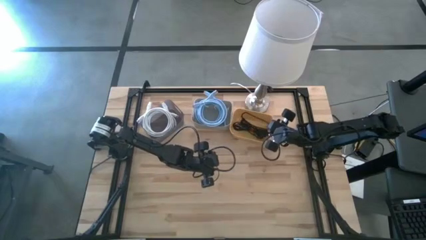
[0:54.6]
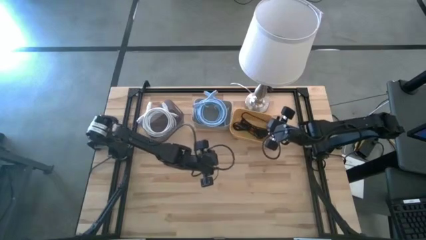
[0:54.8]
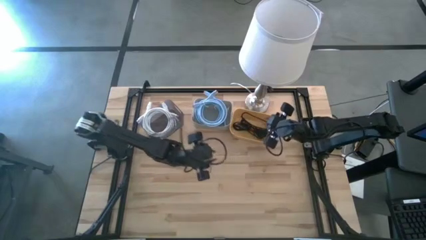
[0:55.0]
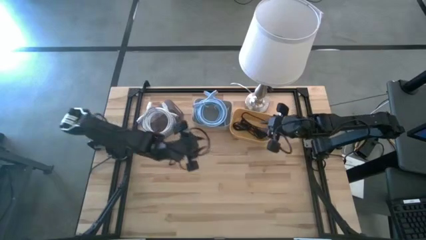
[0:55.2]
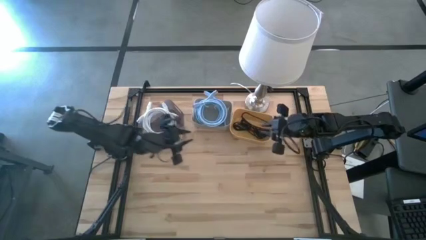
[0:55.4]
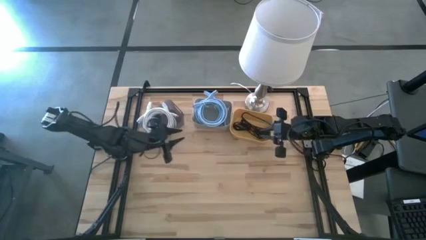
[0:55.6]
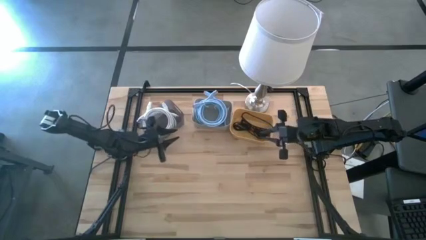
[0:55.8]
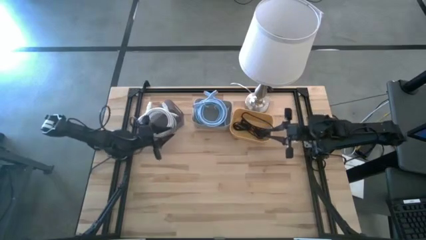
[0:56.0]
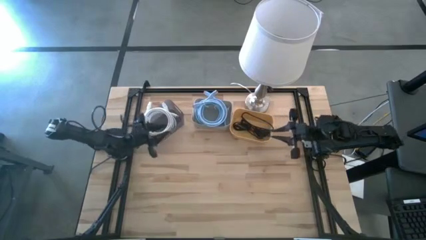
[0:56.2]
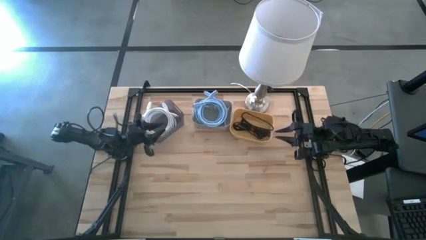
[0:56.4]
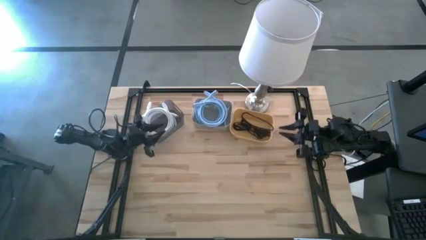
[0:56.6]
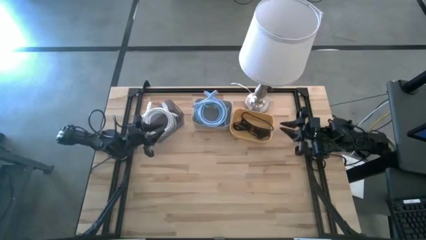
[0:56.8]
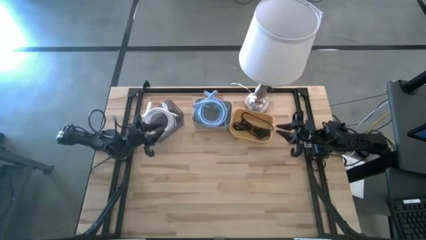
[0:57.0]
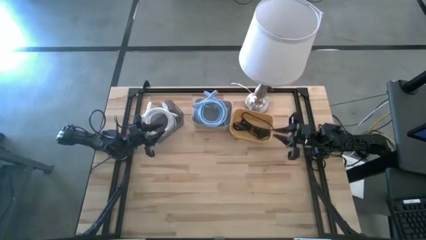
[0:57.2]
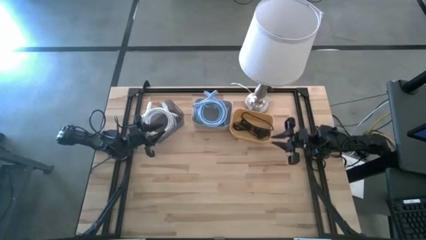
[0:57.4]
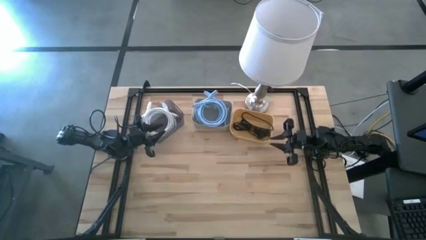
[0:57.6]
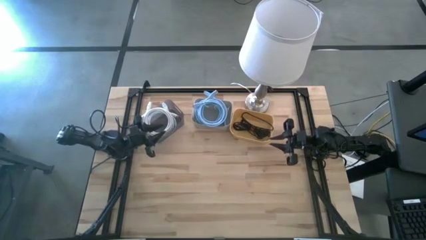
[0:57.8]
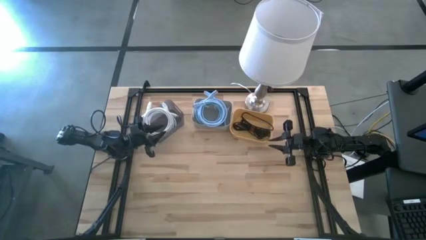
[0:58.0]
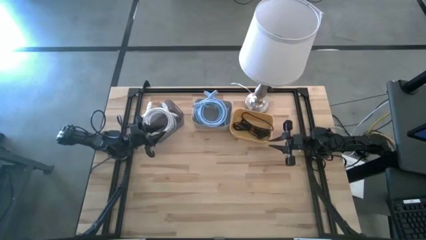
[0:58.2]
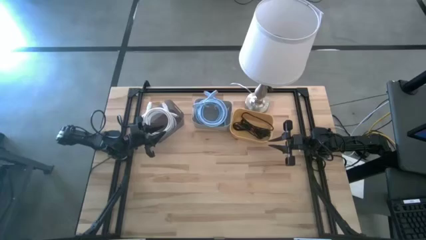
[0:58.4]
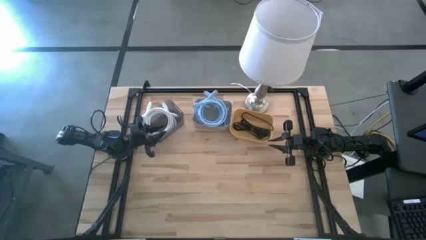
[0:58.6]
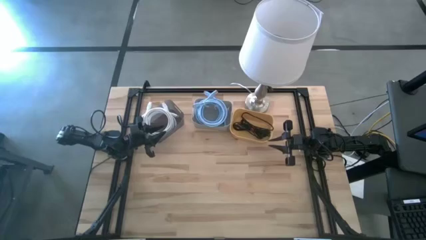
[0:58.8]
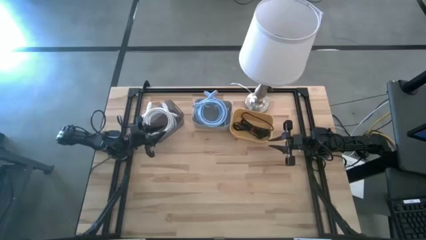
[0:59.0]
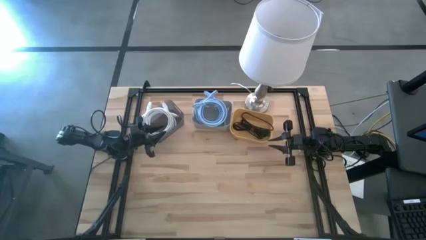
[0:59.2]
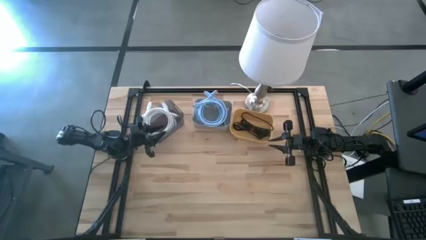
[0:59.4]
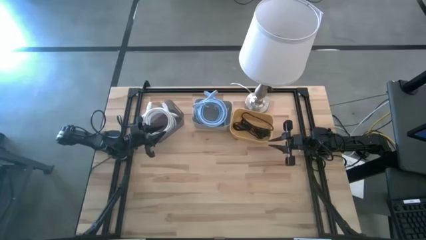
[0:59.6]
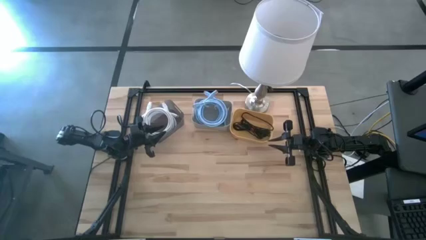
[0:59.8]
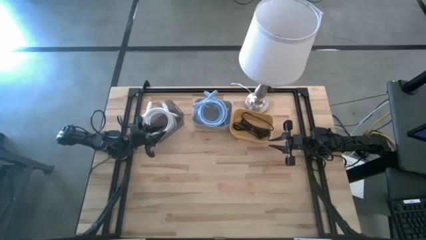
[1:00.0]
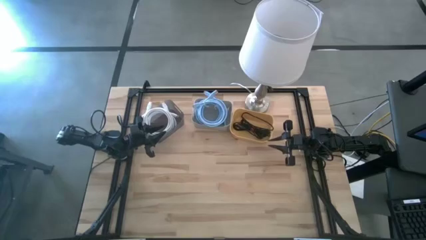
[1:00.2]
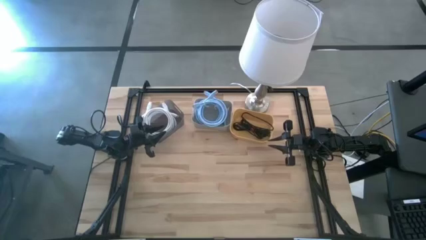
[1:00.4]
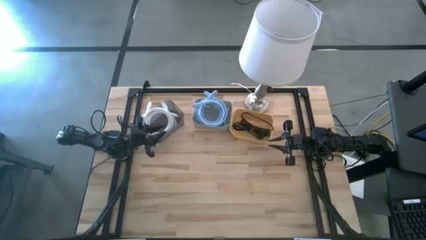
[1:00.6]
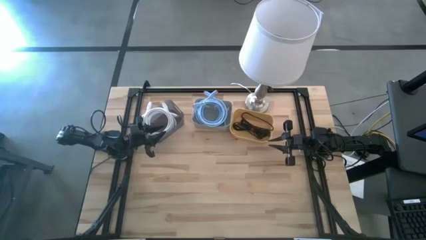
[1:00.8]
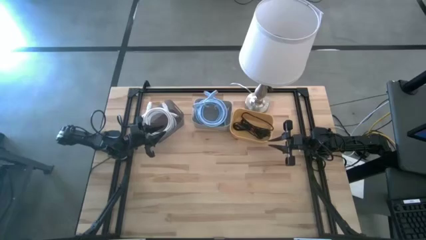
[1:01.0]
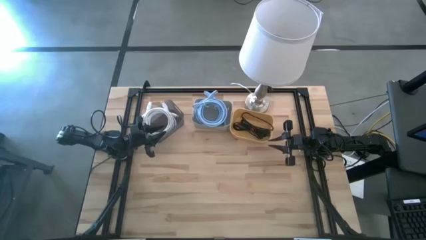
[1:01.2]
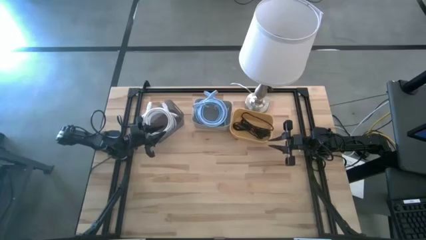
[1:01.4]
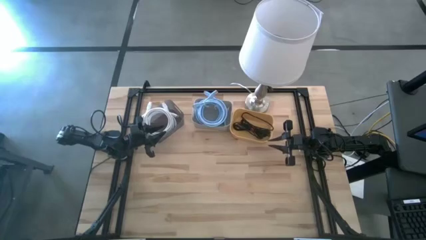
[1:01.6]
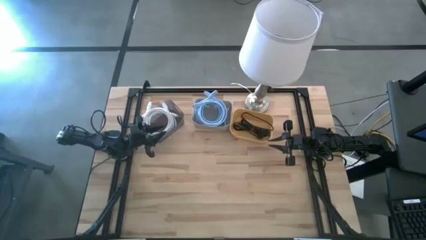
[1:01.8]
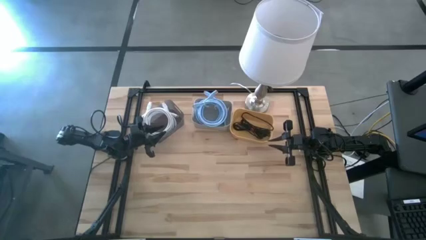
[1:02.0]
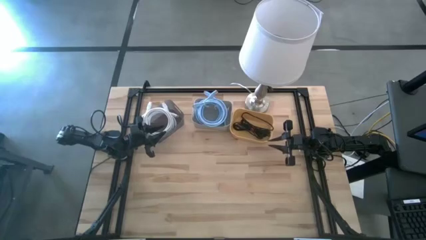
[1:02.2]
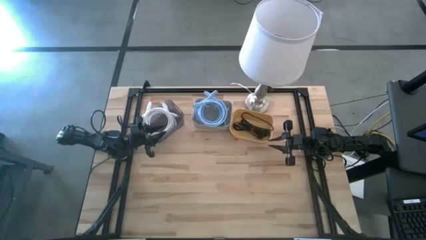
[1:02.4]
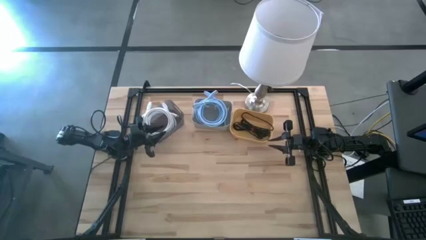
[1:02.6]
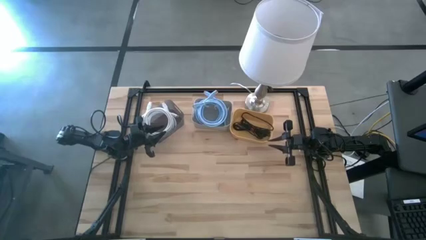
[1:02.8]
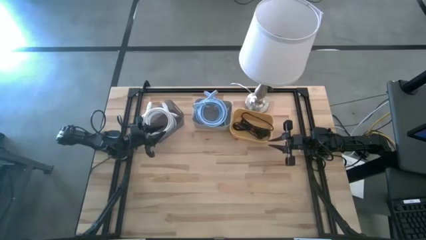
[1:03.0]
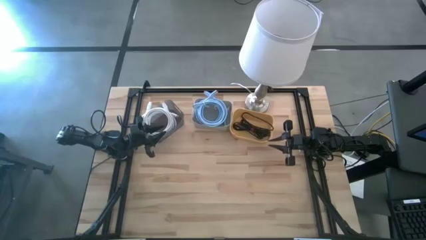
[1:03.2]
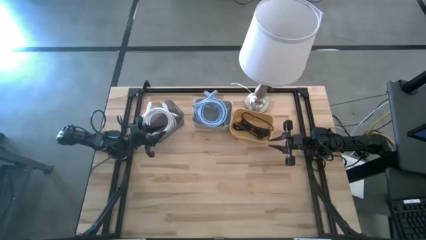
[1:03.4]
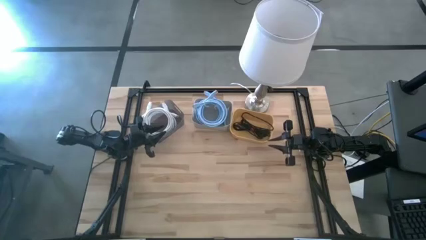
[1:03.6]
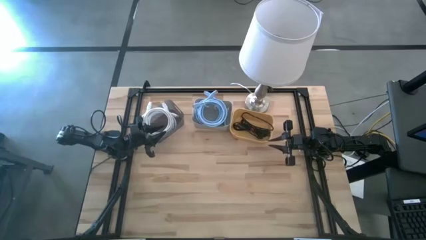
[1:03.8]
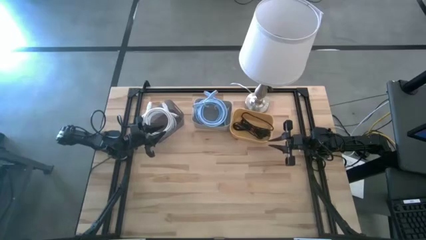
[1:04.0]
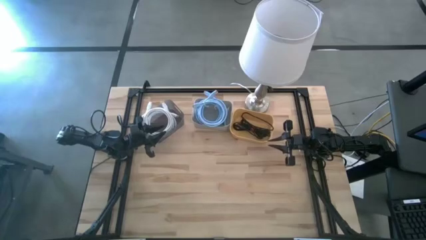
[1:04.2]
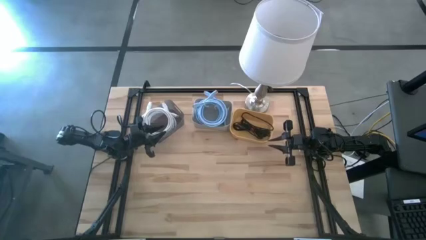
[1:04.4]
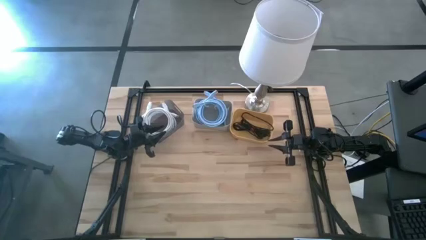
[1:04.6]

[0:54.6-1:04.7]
Task: Pick & Place USB Port
Return to Home Position

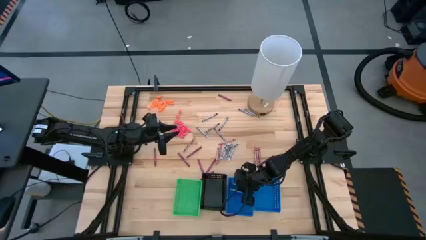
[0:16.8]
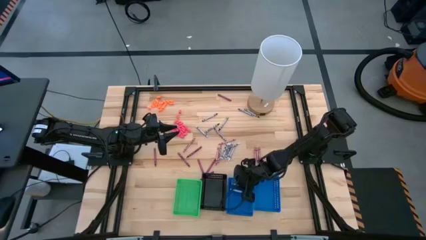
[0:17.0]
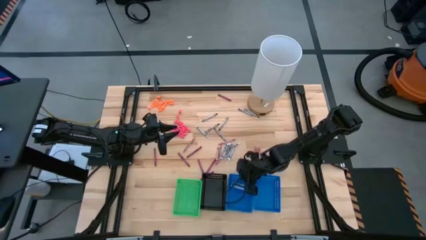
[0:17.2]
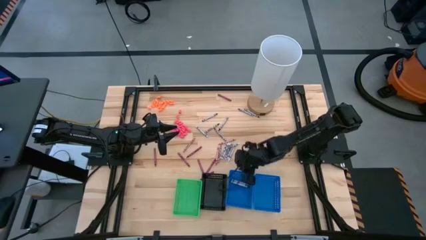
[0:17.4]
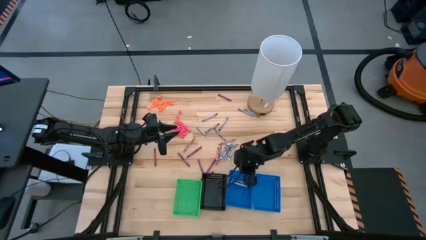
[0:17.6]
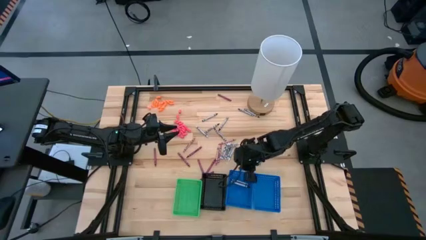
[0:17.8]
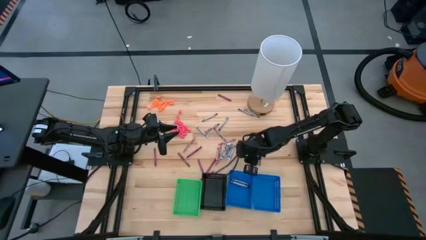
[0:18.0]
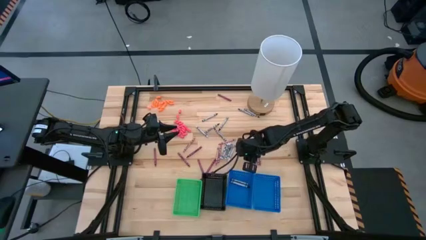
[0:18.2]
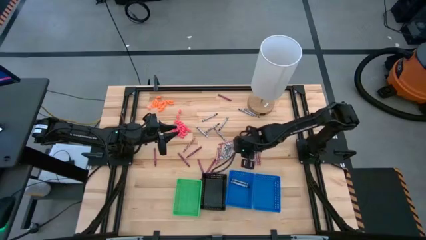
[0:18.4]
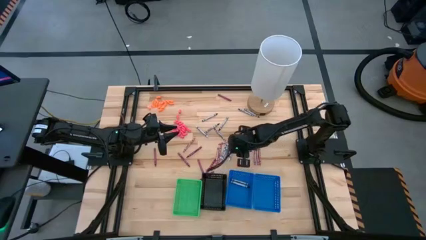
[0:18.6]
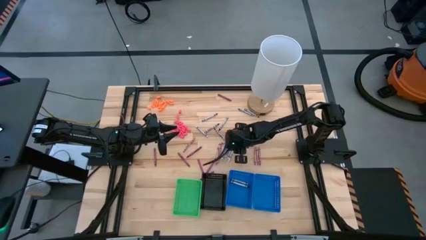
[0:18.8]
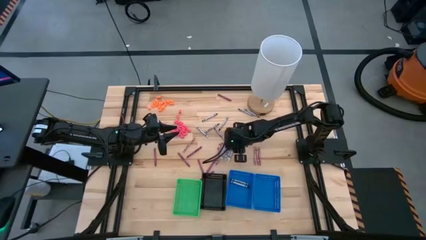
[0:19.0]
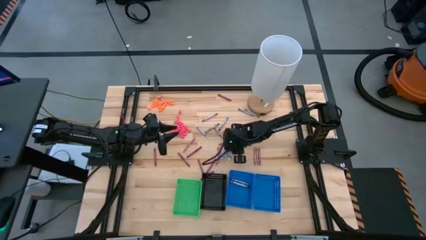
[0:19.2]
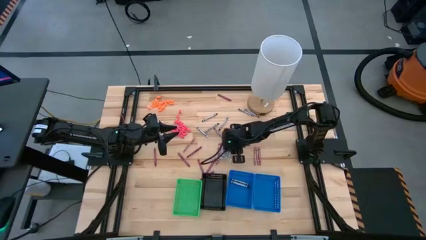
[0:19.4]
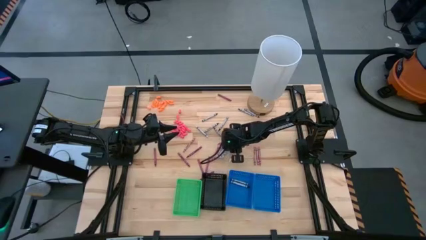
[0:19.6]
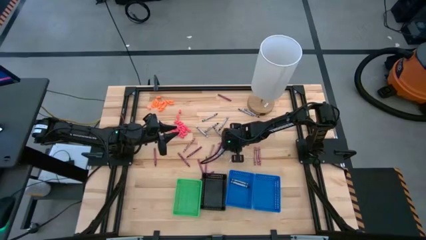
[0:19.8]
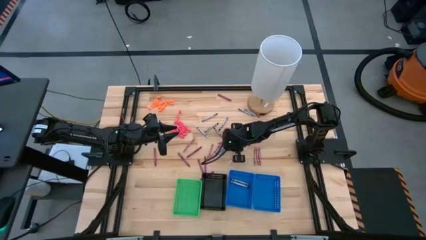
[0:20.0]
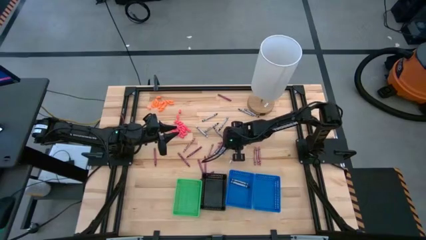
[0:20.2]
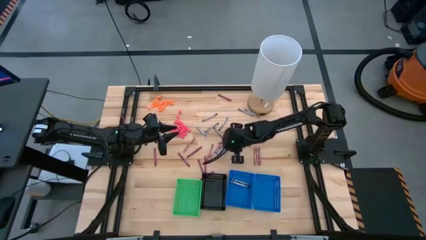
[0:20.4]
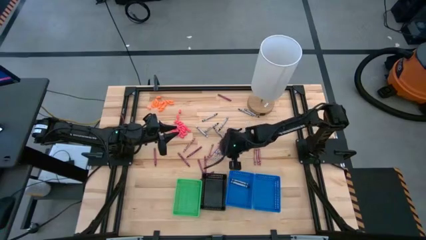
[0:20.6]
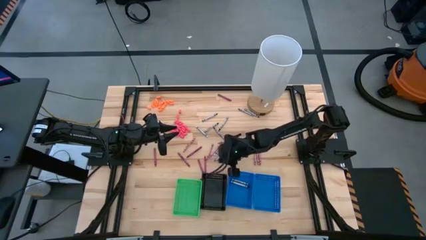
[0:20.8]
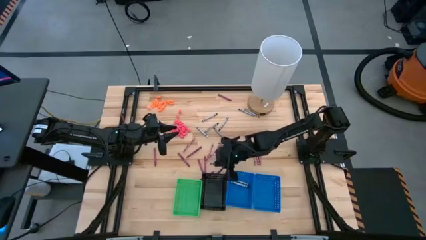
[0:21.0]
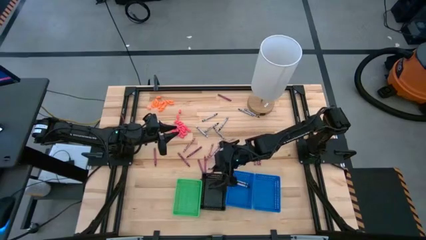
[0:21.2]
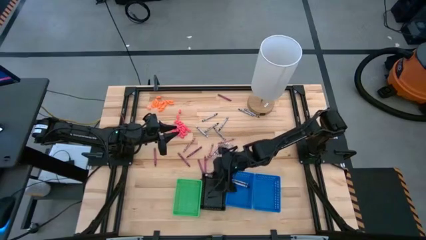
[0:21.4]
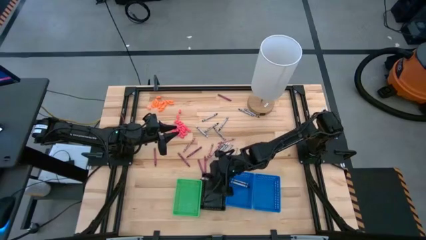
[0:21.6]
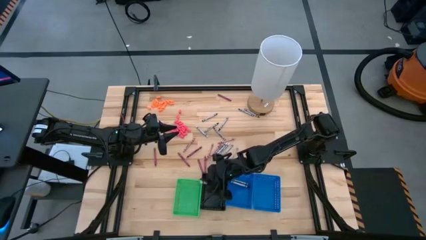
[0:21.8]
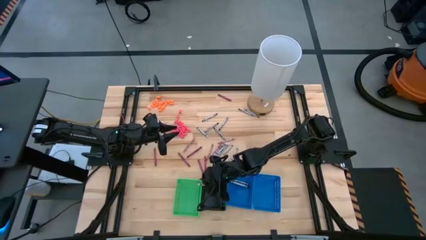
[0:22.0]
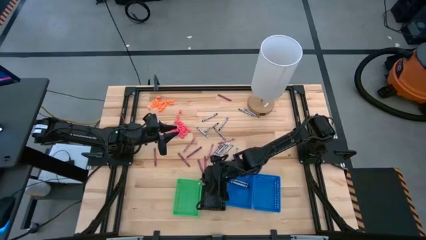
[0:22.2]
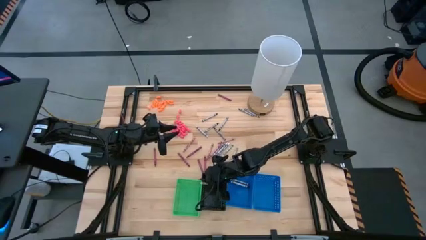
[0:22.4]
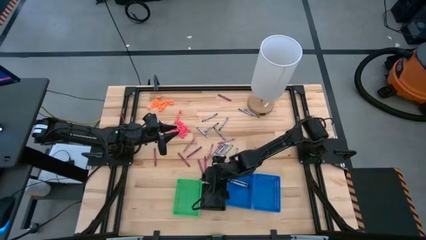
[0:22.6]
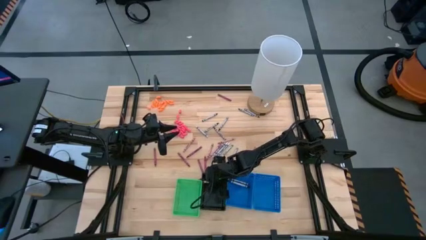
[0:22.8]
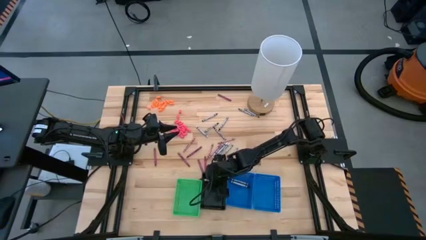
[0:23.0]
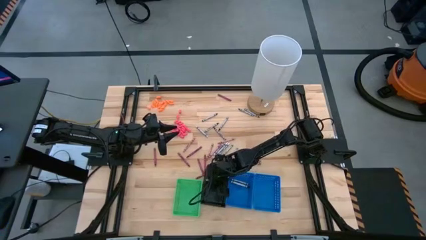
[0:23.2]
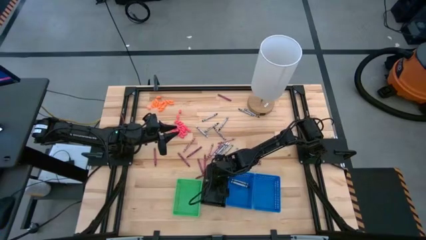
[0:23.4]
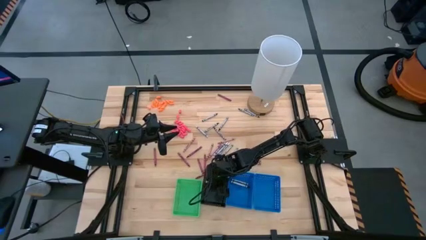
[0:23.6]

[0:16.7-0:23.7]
Task: Sort crayons
Put the white crayon into the black bin
